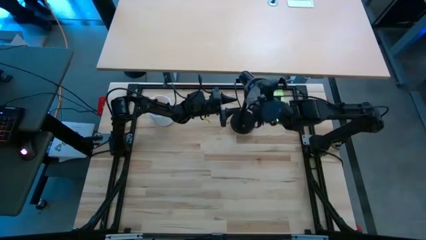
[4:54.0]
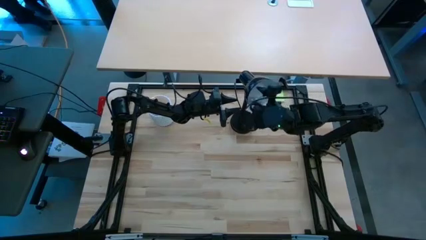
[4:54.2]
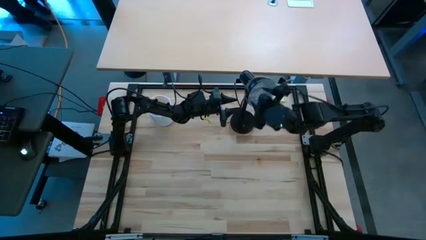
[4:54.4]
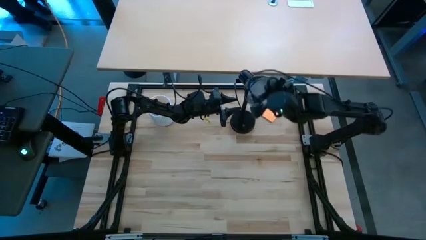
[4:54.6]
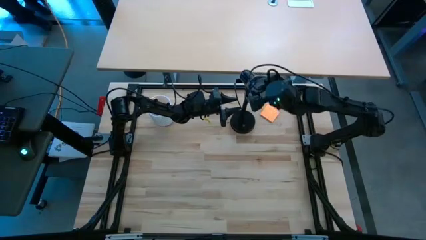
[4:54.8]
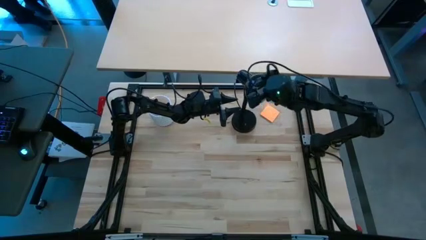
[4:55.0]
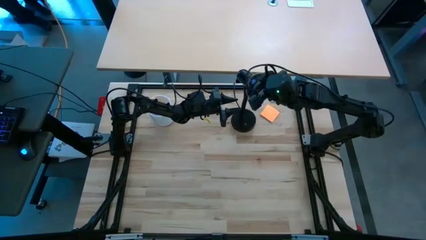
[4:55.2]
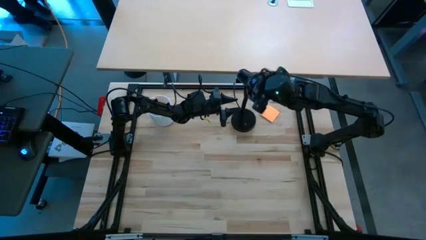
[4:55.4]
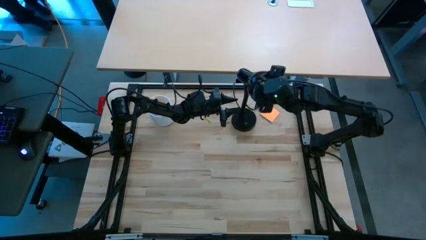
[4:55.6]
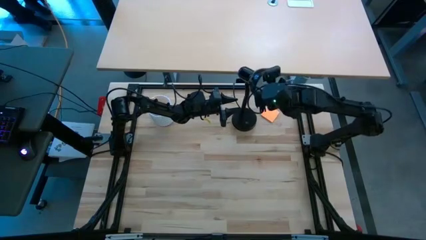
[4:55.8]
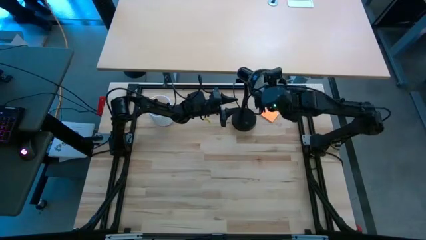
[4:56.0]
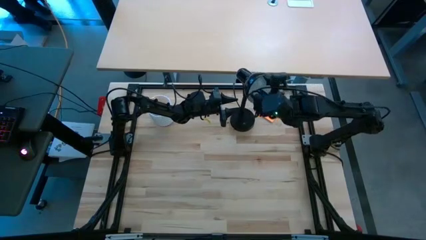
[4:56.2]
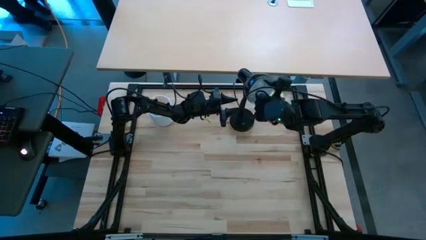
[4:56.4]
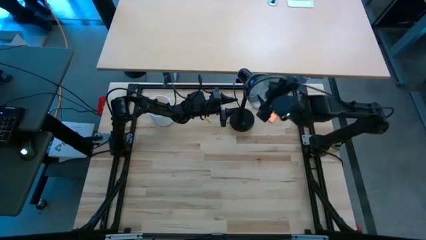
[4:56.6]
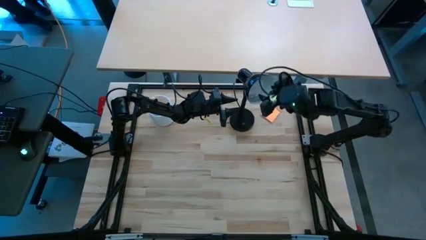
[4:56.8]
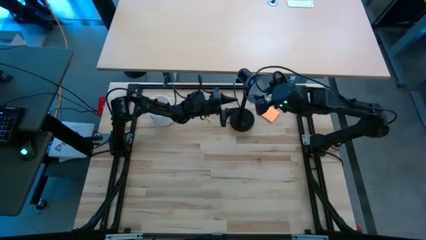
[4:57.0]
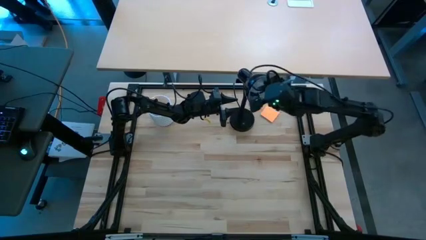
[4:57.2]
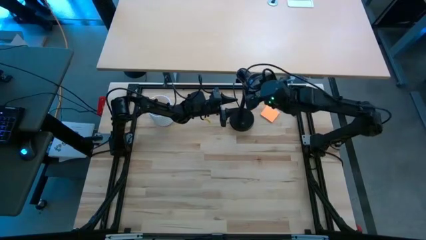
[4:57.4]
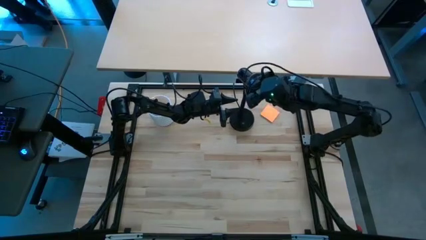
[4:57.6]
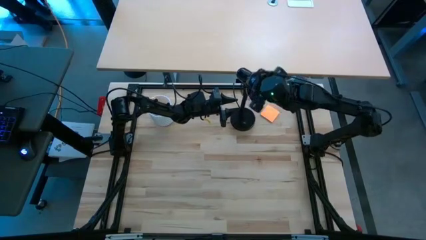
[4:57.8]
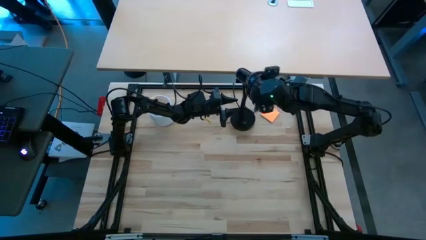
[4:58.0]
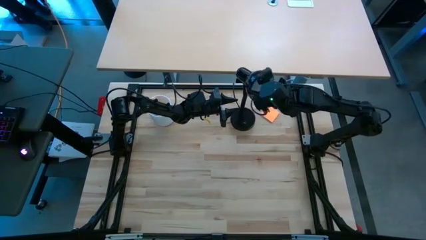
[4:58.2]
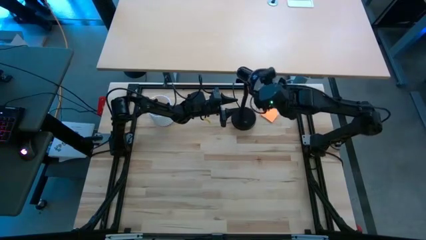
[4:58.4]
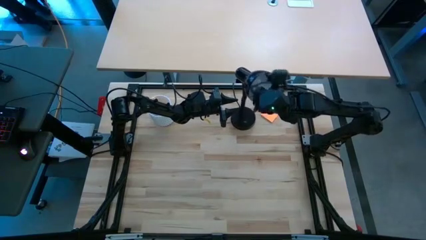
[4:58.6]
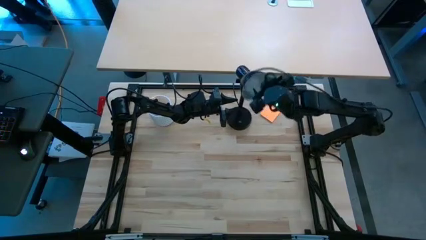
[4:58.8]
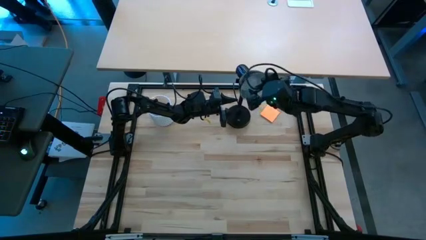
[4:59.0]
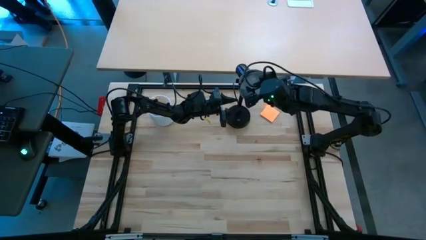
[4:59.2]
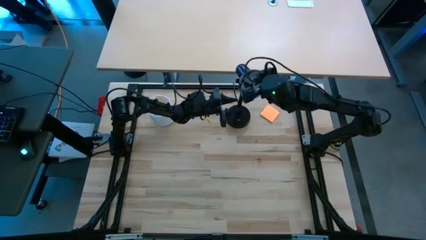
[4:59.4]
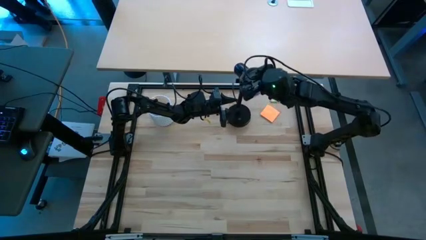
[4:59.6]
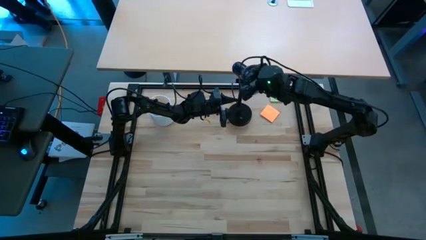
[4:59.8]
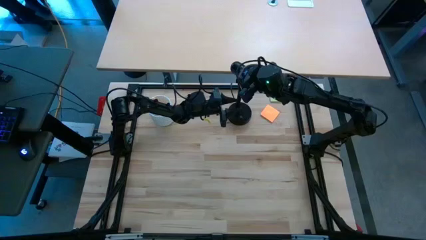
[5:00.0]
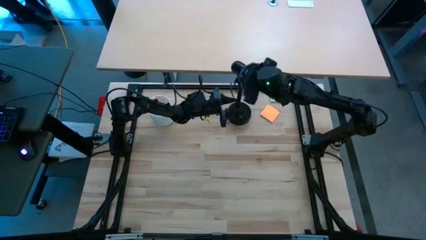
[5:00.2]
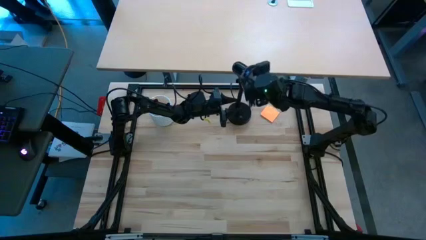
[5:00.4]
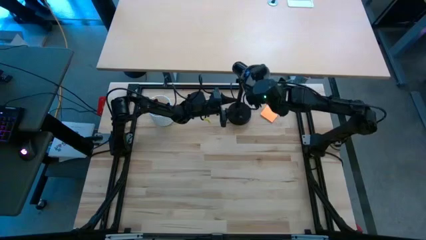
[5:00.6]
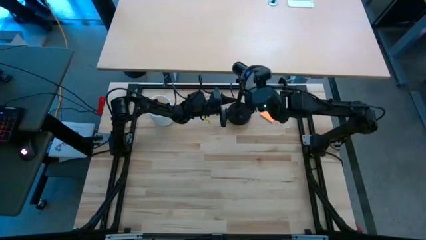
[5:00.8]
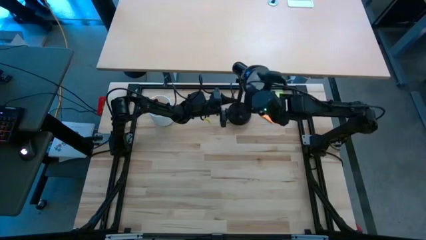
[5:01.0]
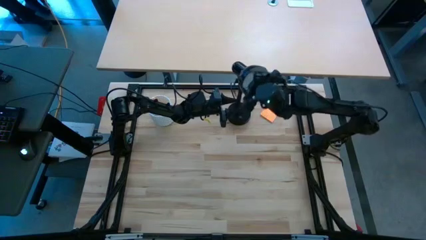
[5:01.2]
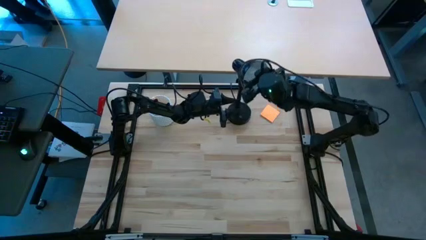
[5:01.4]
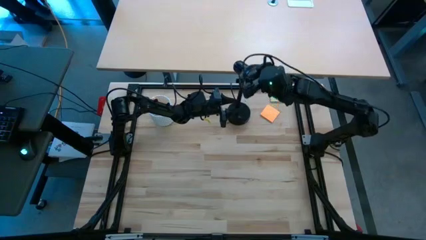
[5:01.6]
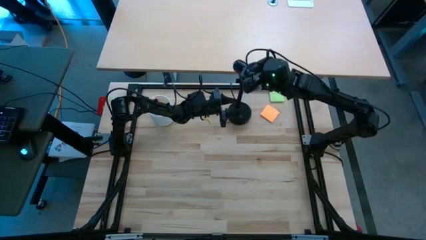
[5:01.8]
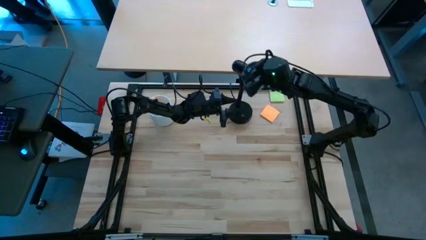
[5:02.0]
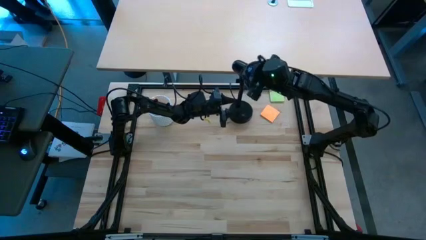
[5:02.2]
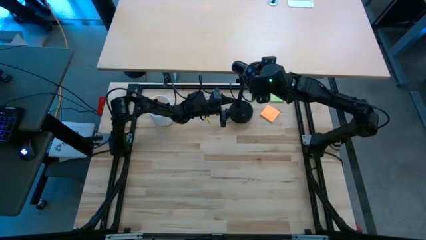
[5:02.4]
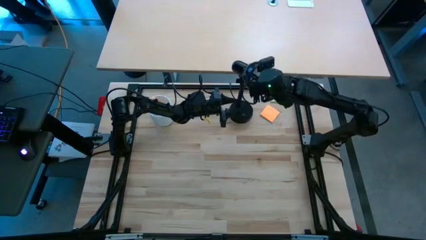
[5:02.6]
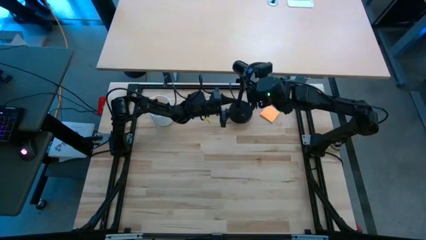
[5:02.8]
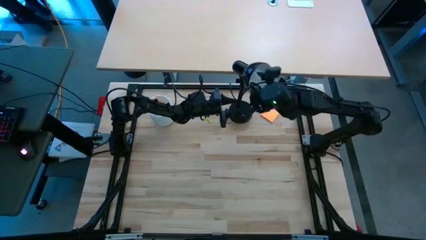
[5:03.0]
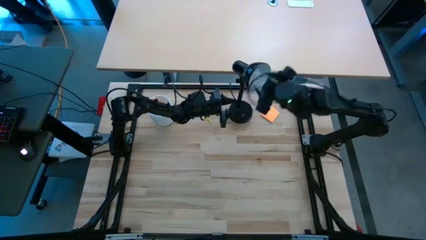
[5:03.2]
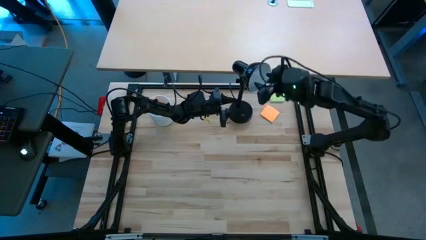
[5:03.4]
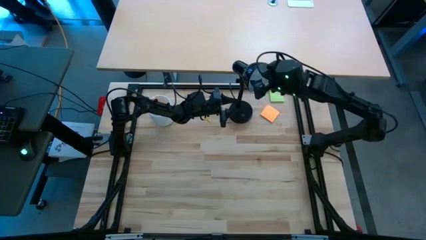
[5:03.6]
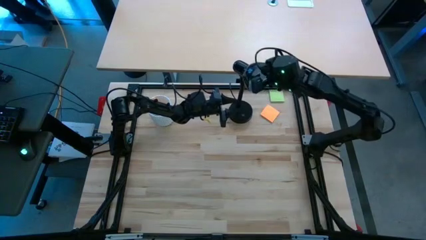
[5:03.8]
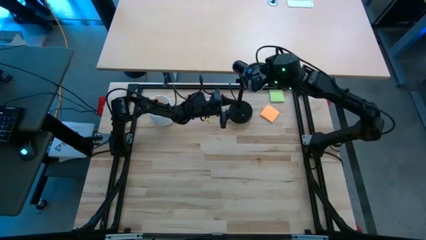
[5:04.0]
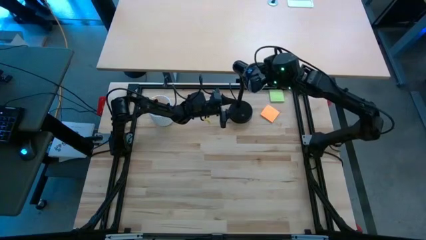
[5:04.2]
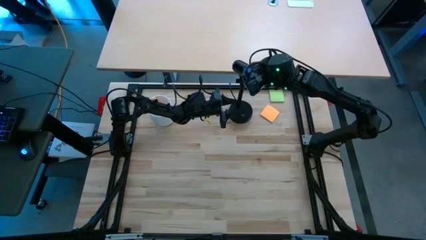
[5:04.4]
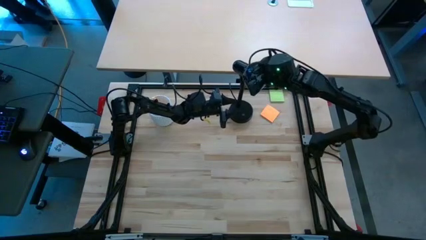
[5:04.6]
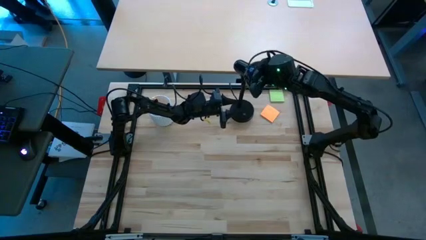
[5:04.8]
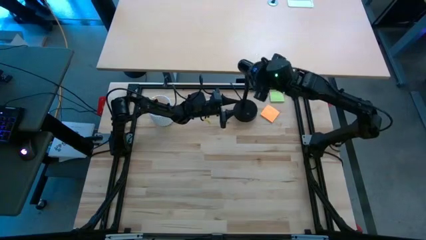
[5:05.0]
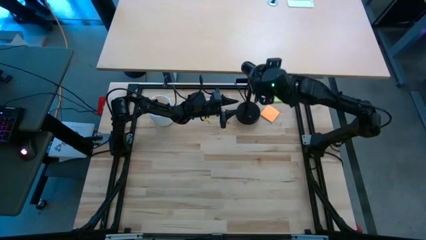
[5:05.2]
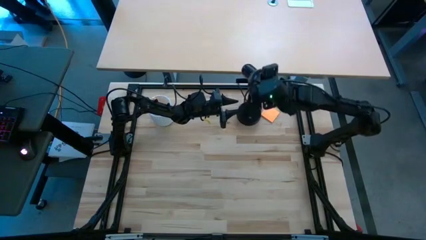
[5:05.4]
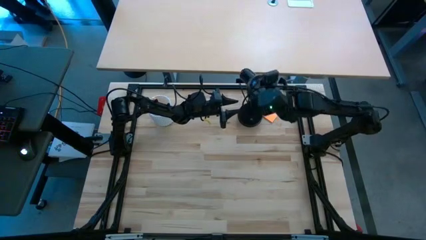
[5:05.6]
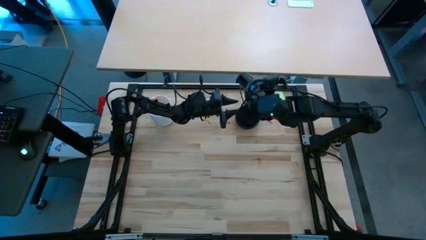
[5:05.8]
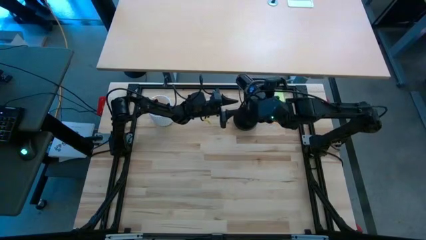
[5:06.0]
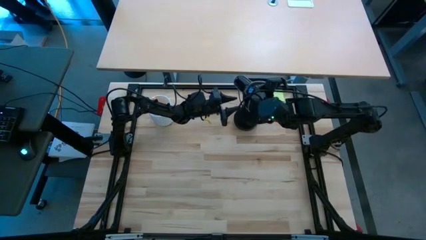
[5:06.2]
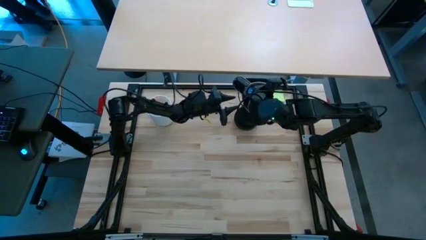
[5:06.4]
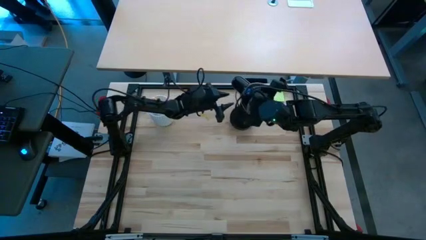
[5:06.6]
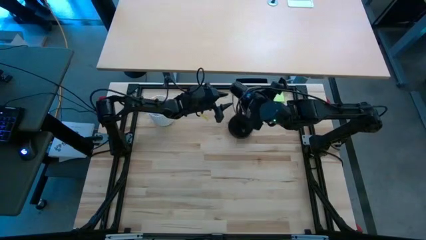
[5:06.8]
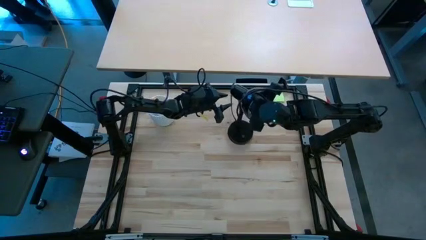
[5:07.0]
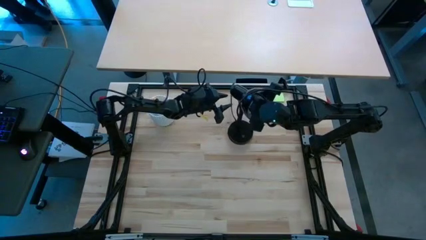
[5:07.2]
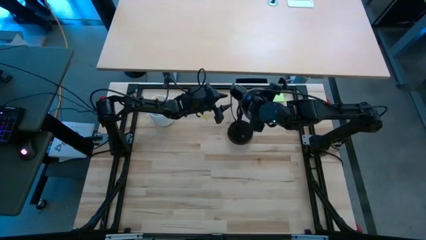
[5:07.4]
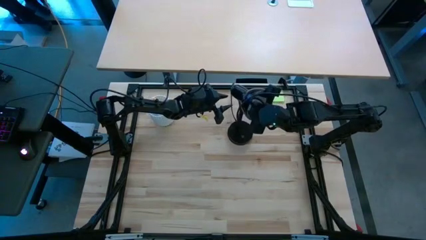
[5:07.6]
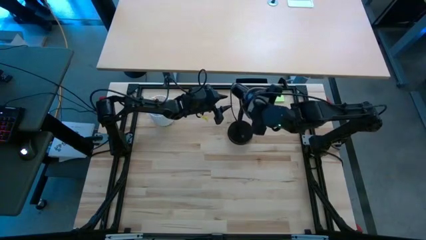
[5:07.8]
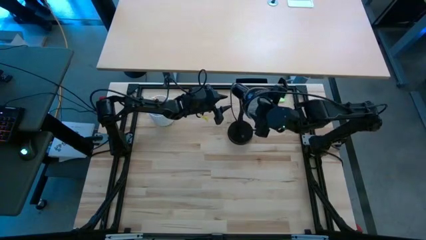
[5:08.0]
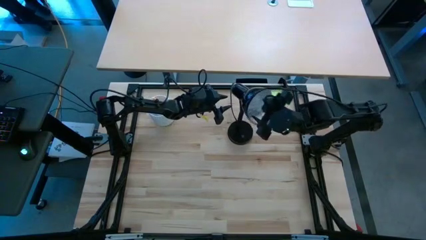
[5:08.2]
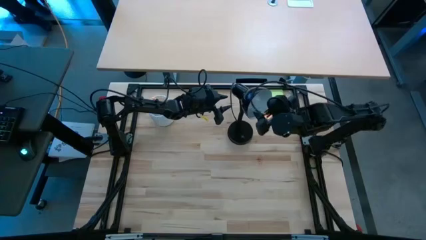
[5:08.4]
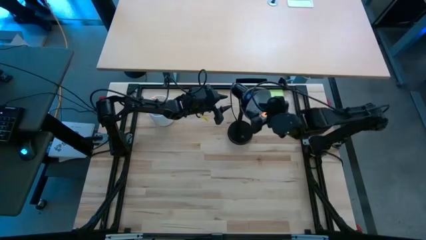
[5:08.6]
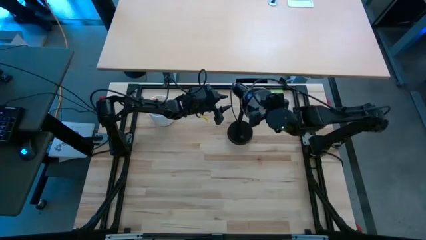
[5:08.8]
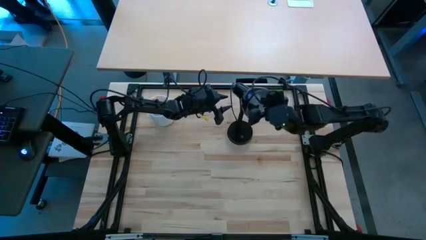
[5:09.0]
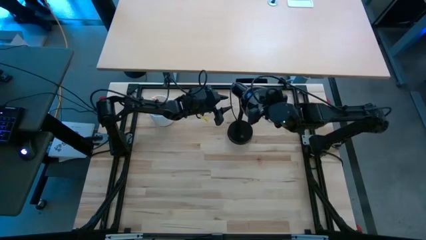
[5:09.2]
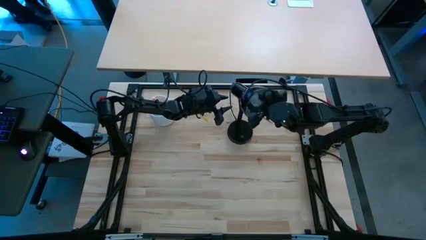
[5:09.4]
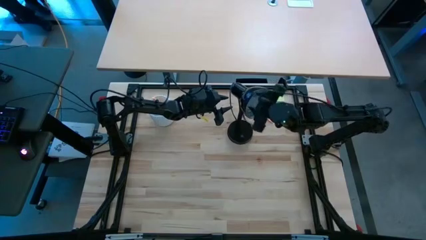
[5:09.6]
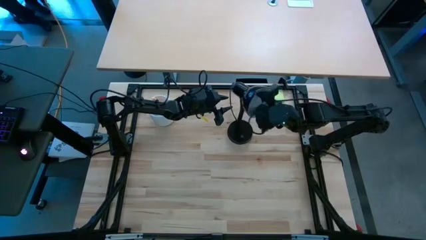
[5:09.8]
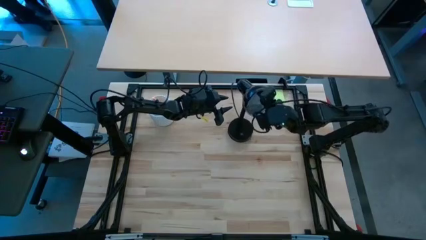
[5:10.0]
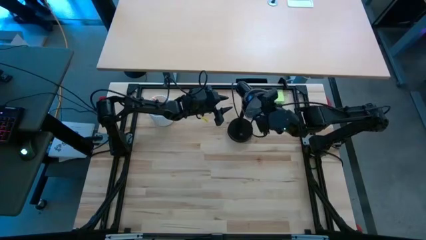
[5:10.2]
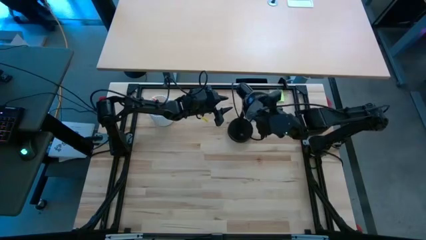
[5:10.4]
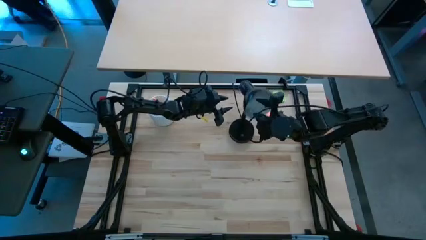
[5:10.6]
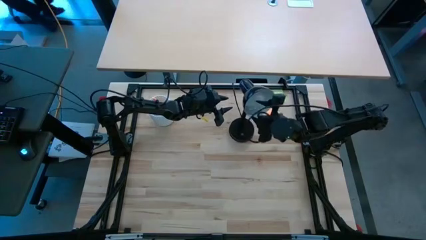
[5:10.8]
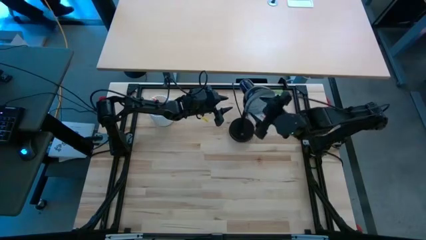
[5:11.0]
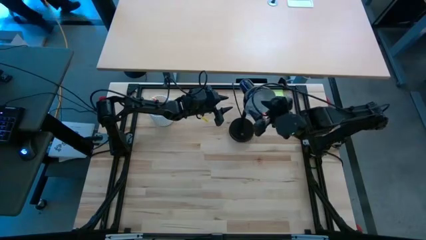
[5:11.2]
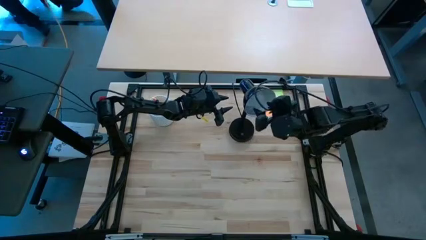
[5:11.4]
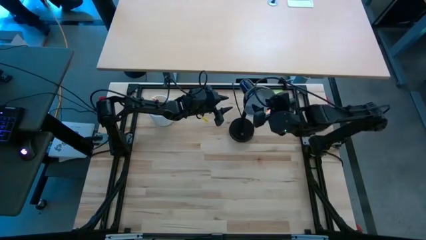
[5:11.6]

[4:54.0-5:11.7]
Task: Screw lightbulb
Remove the light bulb from the desk lamp
